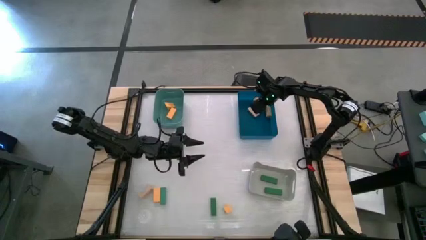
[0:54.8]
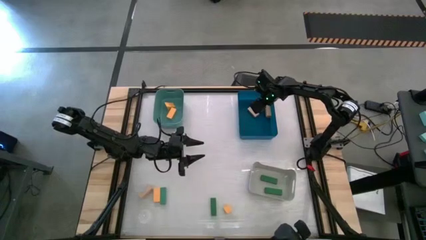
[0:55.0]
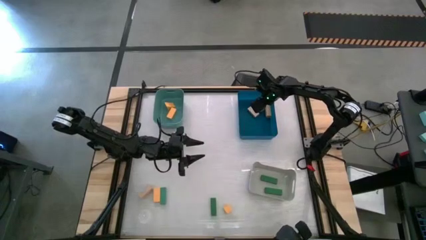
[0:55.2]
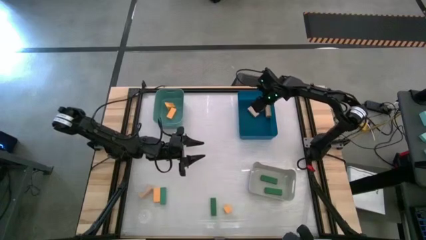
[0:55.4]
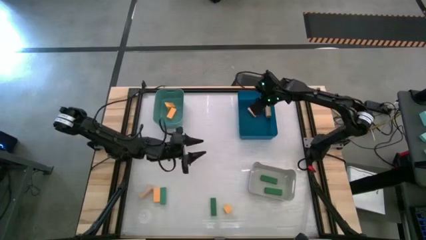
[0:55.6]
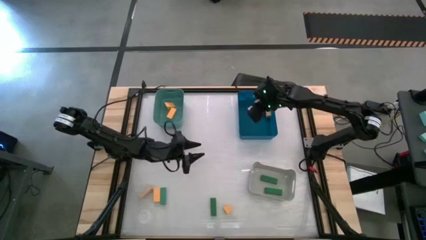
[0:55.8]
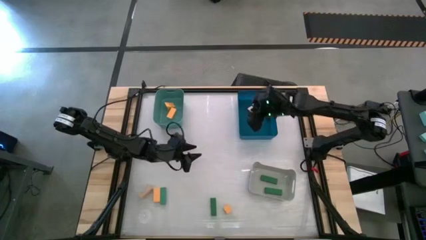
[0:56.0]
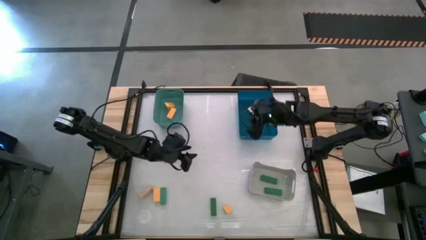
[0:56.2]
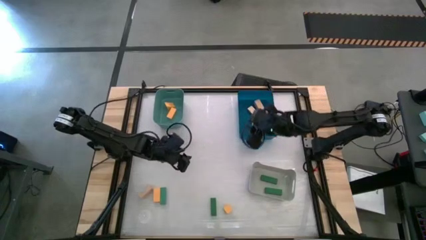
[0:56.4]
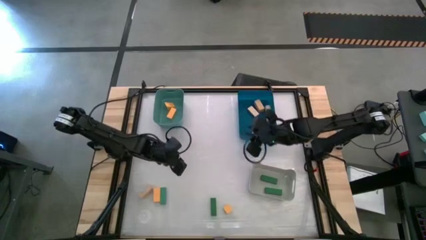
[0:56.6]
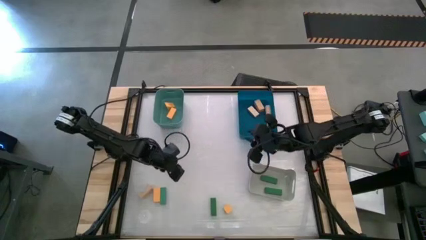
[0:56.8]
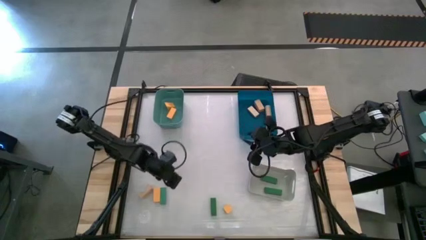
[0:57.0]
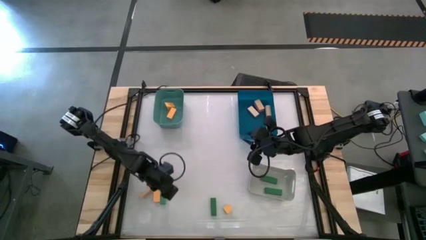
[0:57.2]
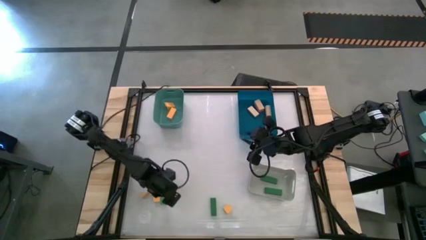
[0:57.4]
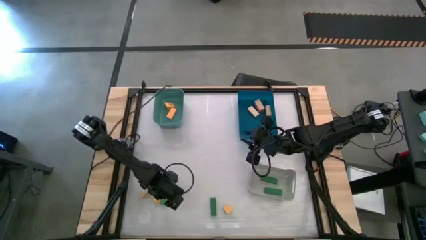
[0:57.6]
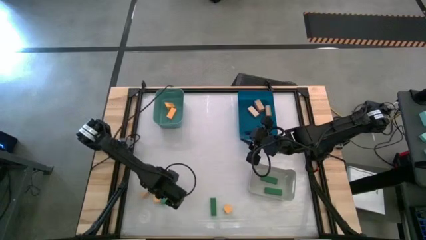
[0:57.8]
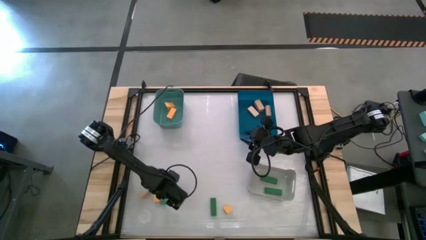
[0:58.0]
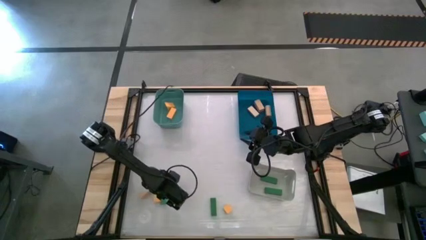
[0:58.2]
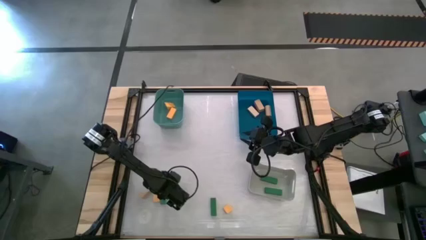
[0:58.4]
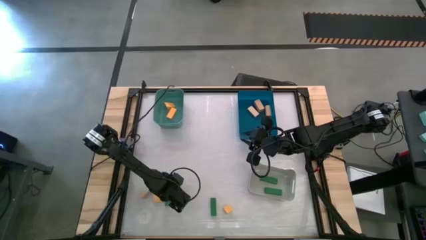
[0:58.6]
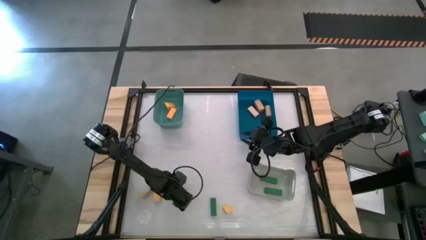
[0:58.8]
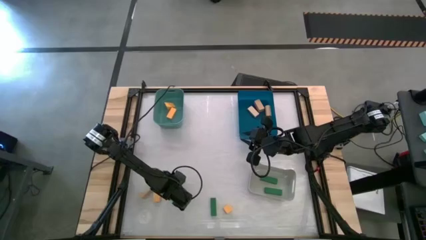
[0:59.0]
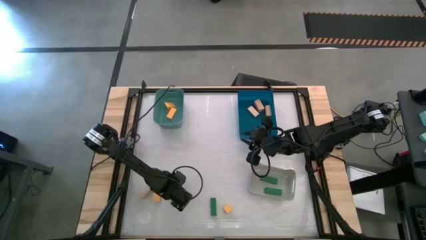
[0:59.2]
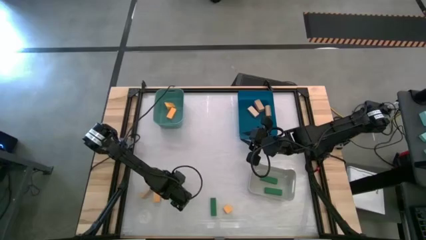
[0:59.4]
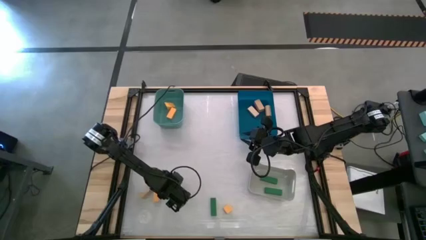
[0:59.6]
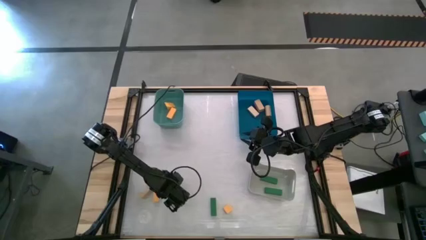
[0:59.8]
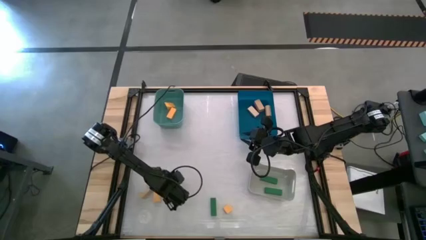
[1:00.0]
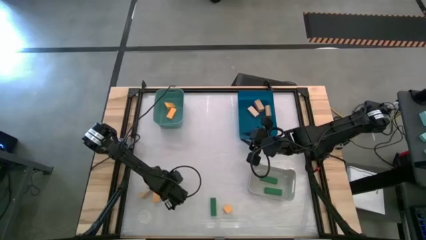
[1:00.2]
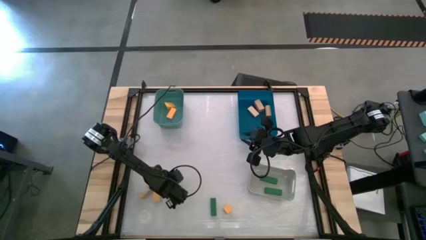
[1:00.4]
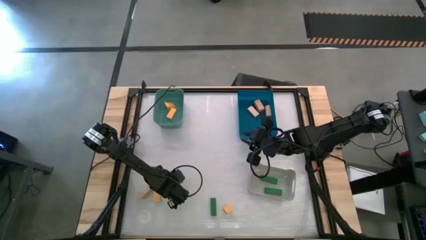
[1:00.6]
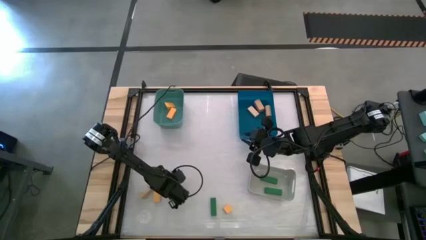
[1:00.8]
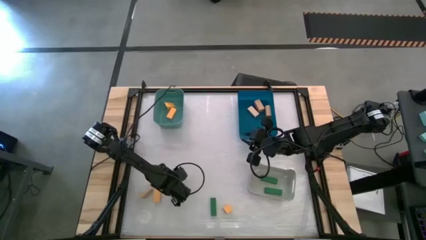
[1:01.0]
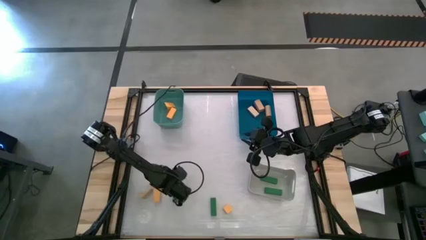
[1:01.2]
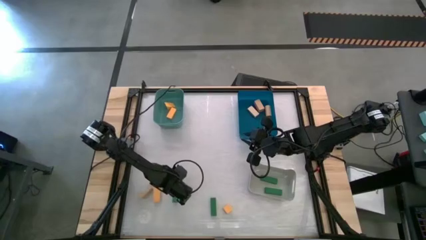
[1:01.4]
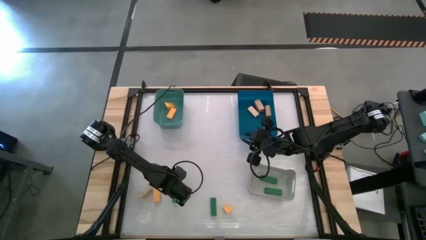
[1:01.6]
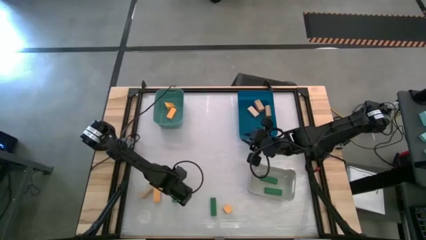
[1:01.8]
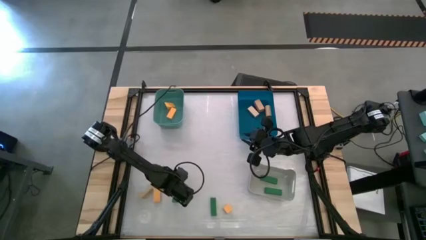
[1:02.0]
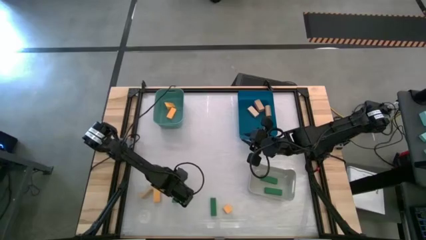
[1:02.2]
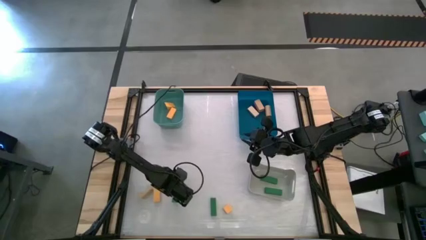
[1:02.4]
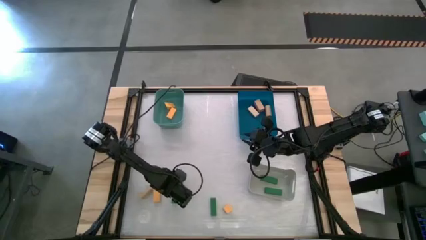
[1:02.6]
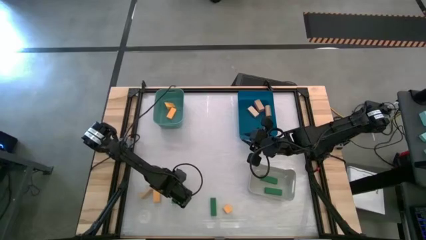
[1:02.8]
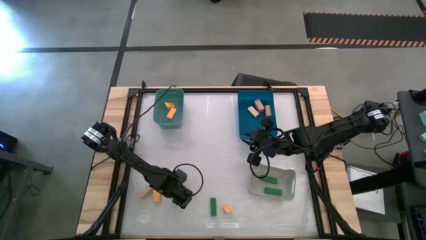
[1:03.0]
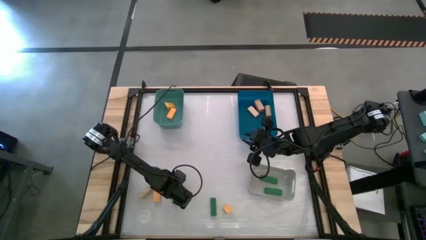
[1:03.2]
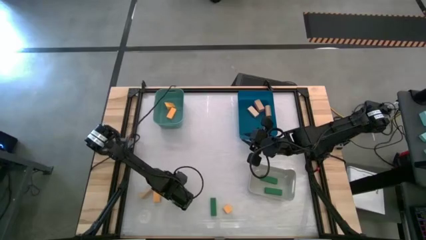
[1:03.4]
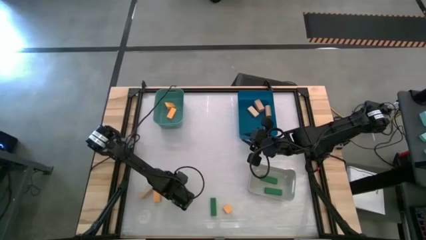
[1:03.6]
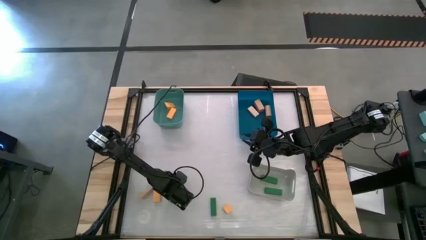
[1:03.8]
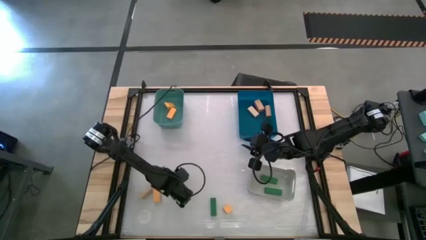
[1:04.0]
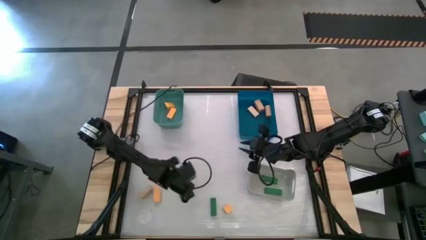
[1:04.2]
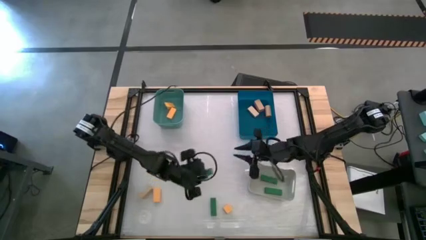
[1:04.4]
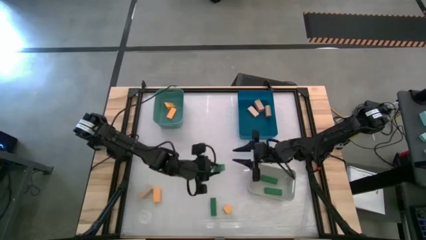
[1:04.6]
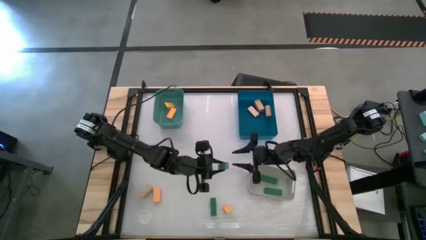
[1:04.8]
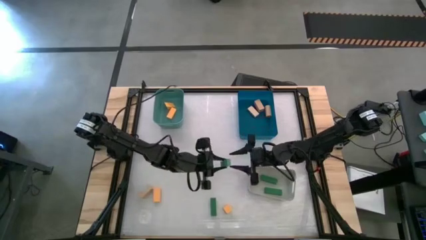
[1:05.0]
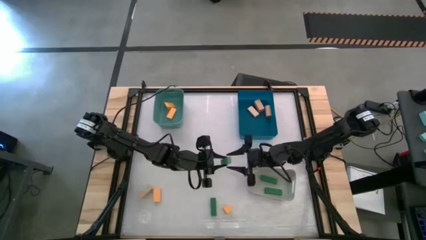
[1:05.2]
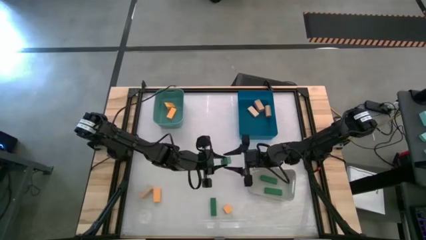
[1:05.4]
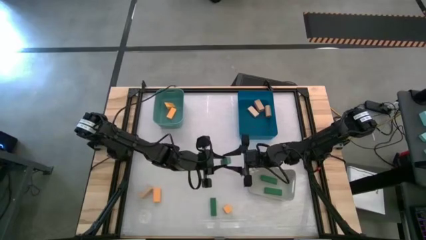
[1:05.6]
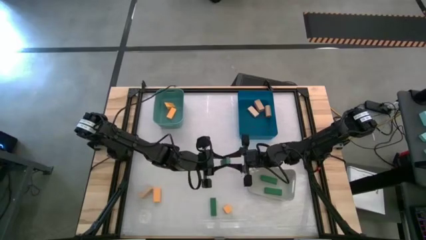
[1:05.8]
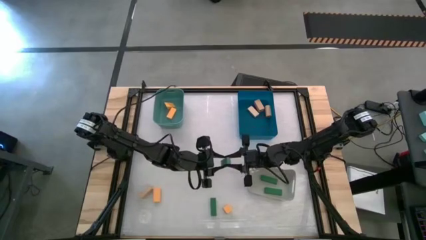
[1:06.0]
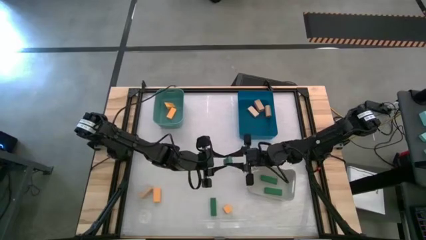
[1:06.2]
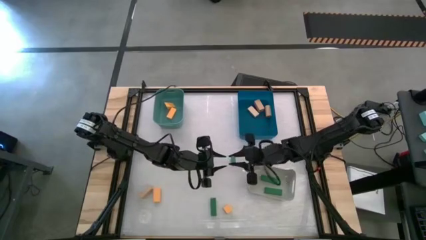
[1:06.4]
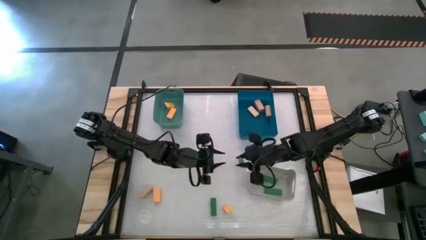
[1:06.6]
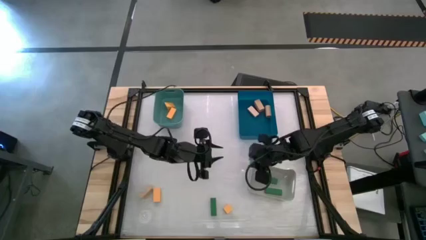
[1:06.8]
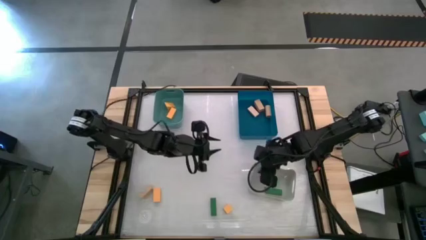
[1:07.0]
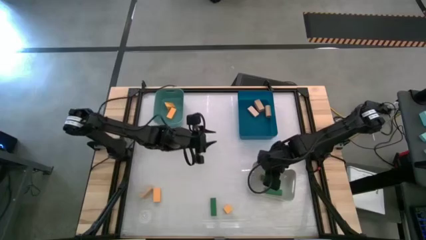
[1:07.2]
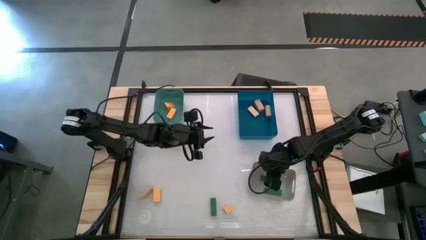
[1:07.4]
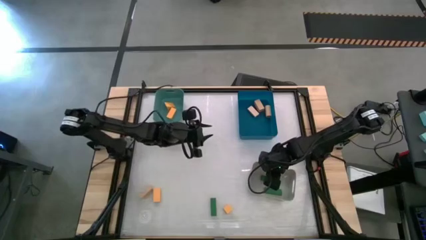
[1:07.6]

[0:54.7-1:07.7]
Task: Sort & place blocks by color
Put the green wooden block into the gray bin
